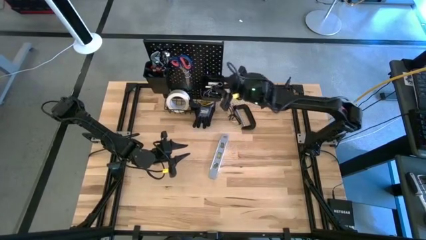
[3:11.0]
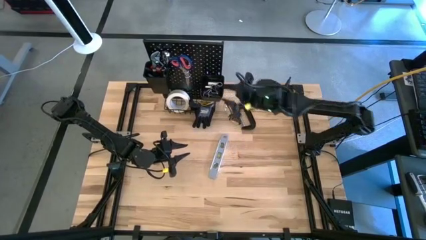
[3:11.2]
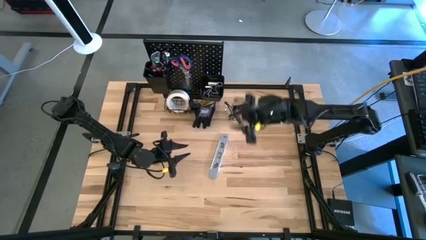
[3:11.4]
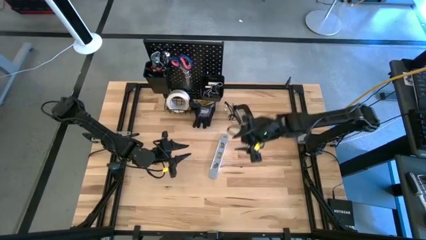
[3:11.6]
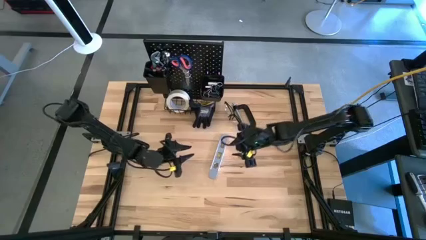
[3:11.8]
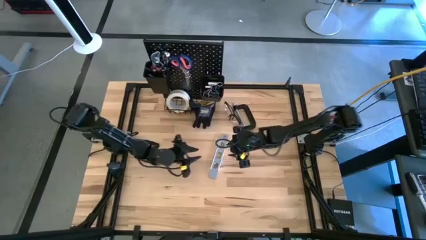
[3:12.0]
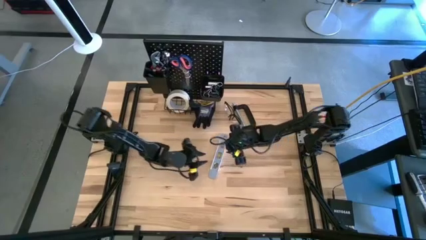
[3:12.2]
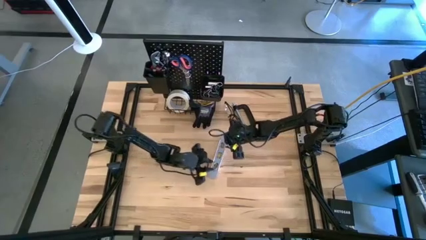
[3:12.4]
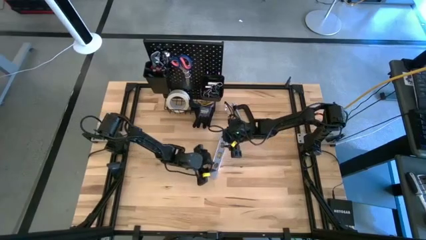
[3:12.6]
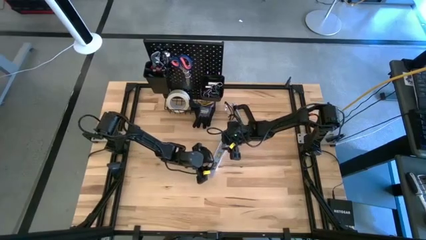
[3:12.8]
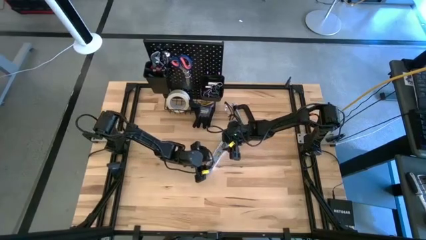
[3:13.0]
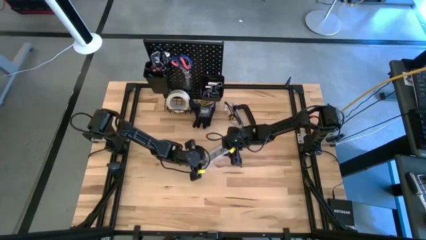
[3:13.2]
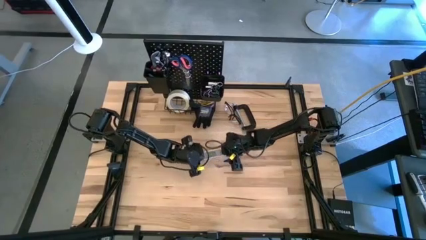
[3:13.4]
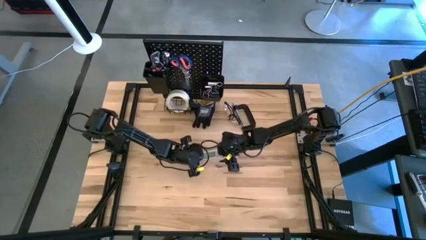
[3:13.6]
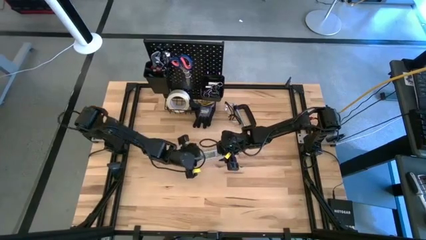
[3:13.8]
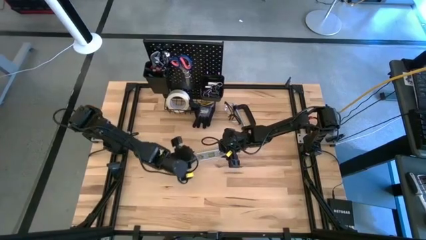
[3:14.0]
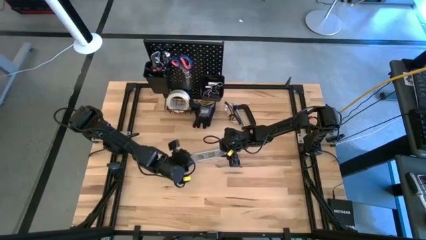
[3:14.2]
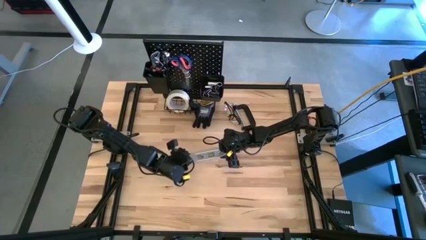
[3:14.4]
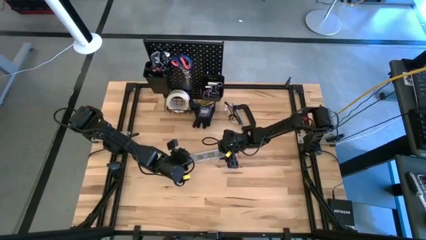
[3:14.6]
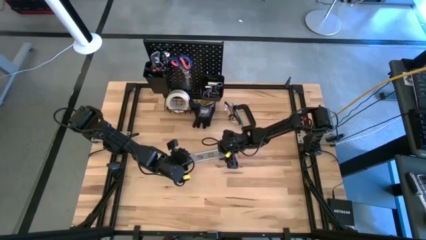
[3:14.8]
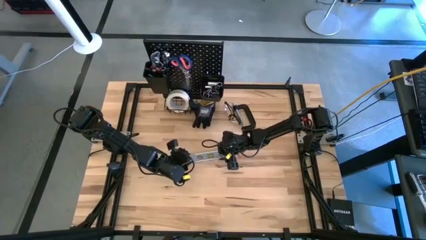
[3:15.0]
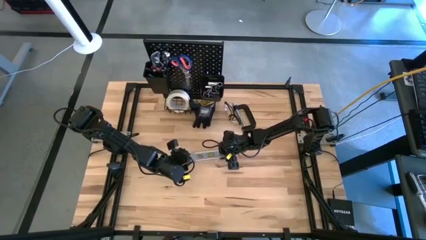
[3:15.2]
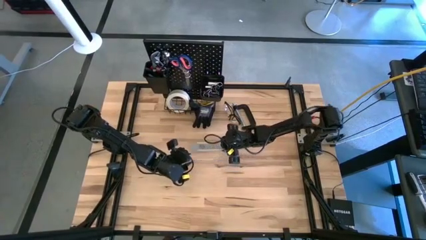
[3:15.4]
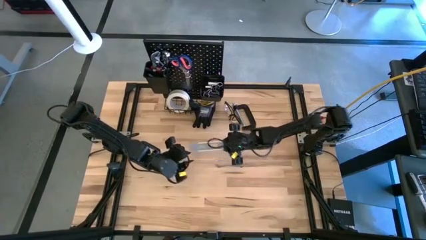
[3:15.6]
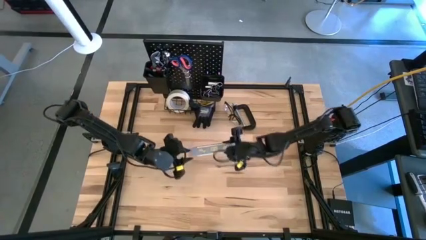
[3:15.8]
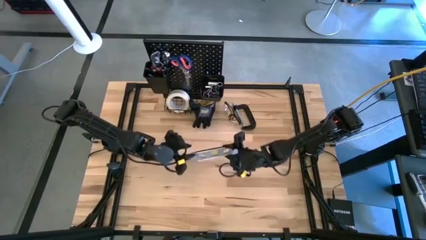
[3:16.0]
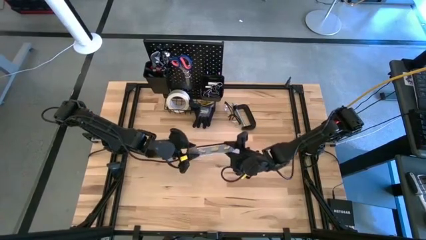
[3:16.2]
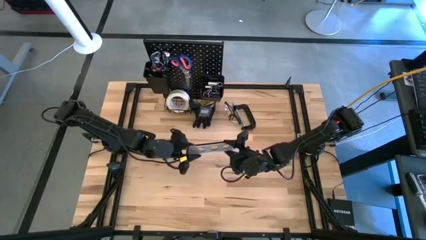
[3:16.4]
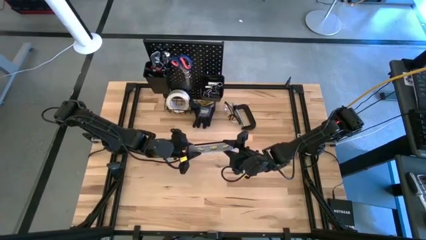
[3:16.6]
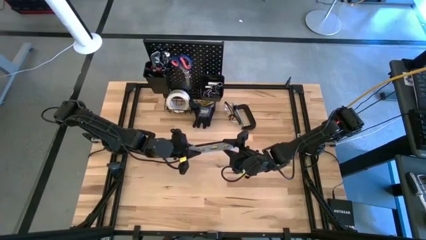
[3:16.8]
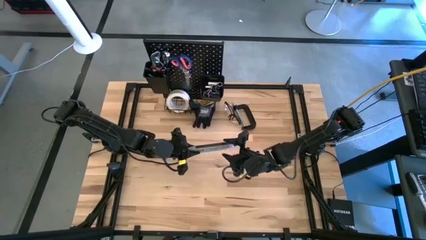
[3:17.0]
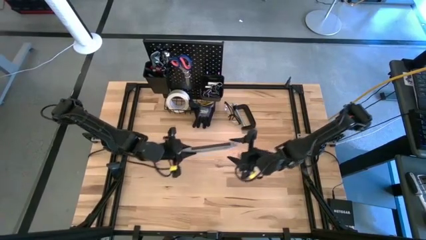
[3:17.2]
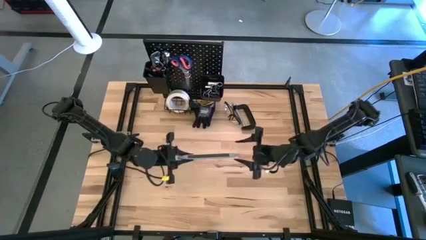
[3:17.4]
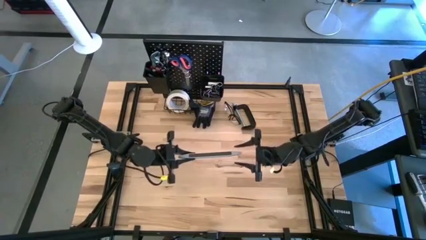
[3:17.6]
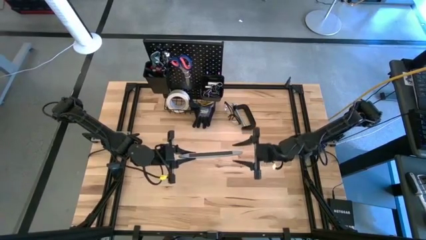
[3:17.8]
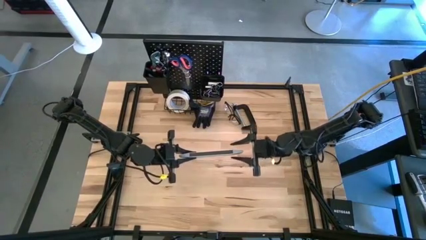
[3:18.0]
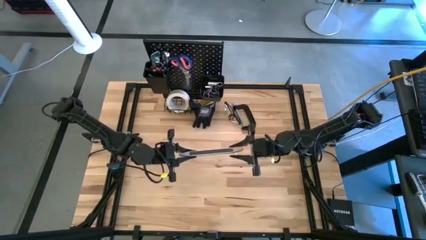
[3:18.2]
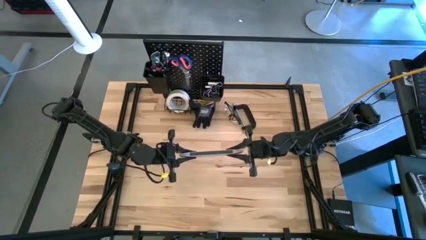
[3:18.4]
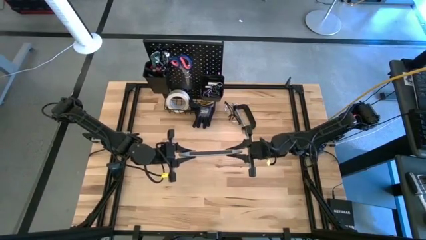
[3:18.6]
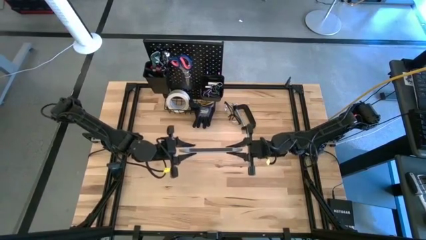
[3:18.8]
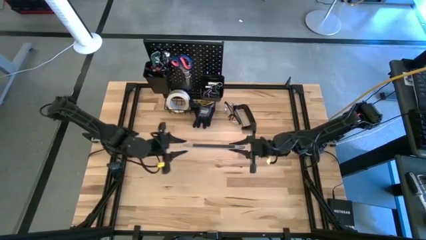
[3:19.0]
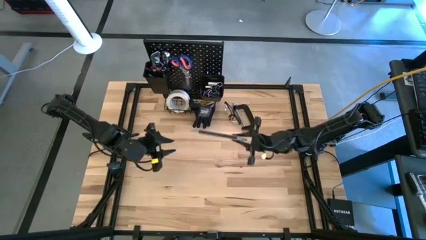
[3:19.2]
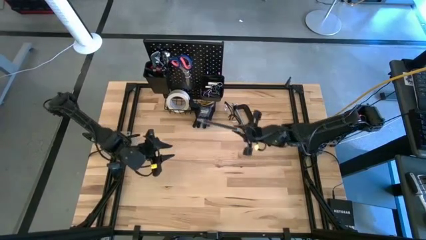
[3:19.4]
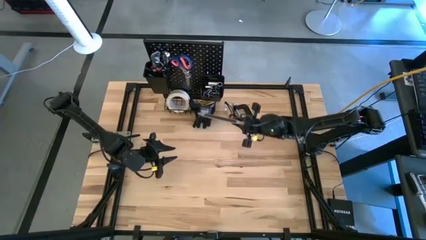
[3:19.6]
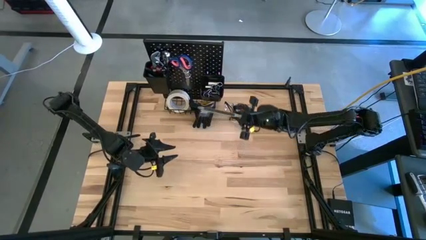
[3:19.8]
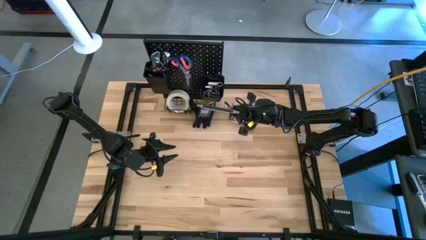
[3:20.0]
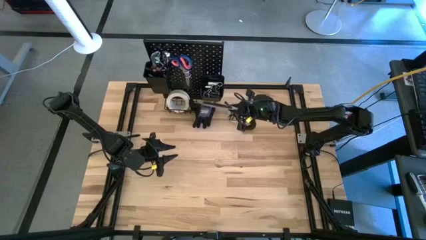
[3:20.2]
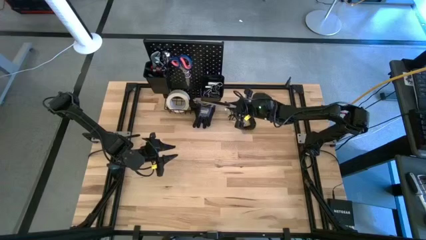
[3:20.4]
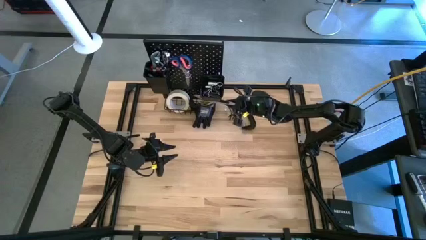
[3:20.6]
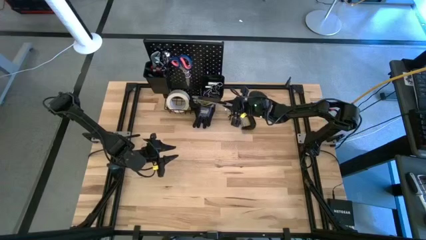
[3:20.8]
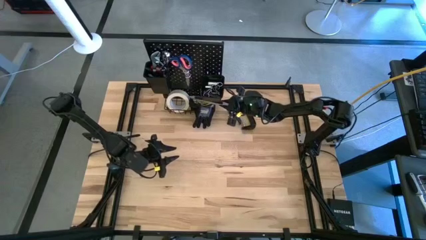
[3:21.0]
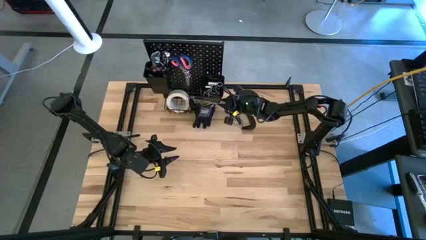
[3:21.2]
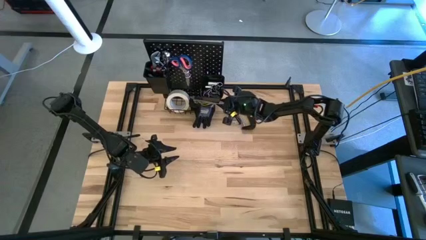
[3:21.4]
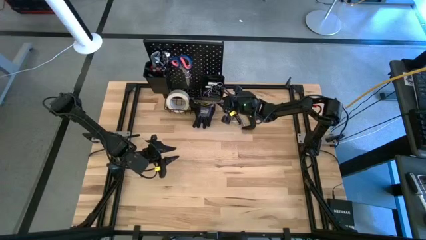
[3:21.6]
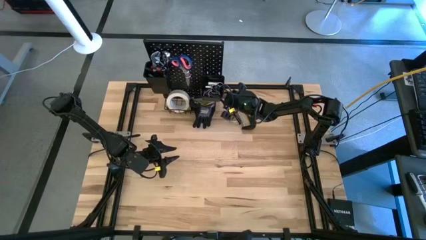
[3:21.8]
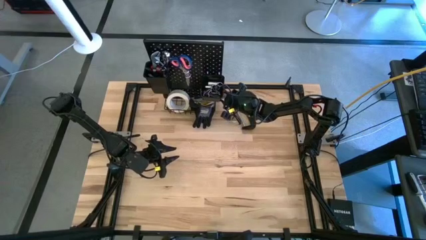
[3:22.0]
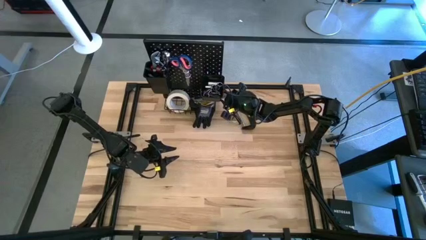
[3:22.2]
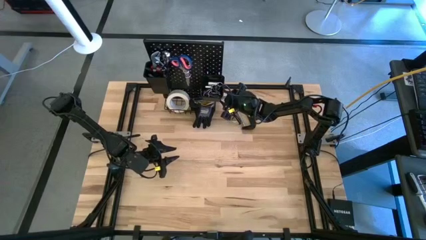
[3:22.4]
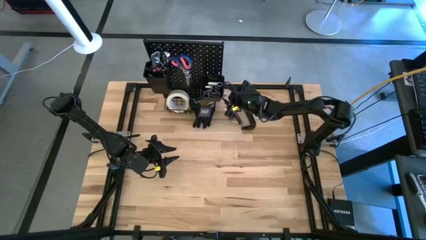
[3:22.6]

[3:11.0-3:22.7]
Task: Hang tools onto peg board
Put the spirit level into the wire basket on the pegboard

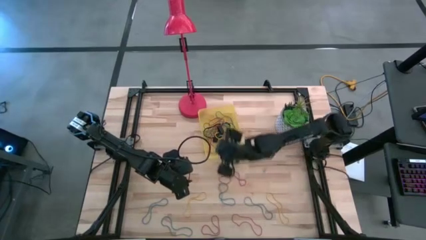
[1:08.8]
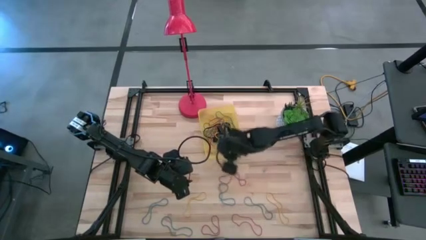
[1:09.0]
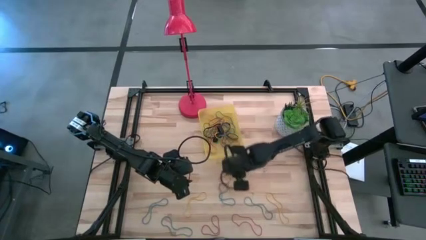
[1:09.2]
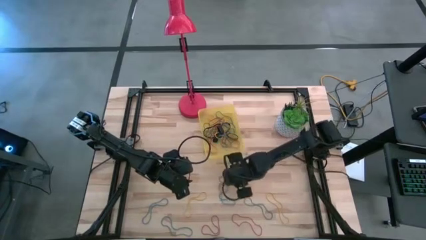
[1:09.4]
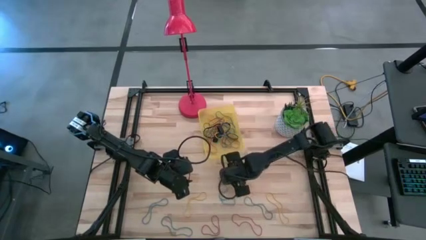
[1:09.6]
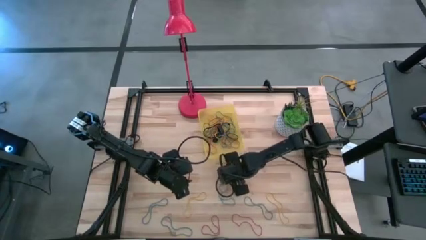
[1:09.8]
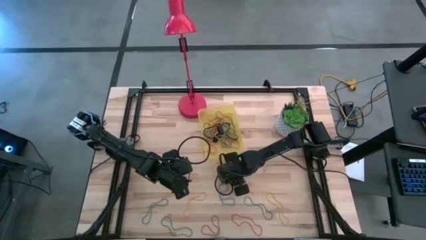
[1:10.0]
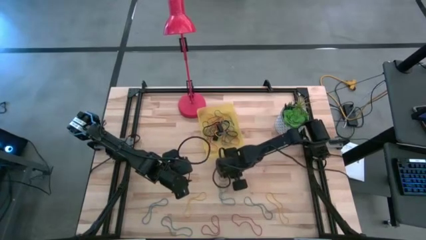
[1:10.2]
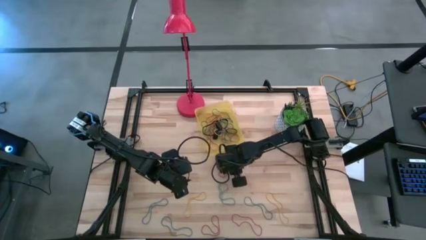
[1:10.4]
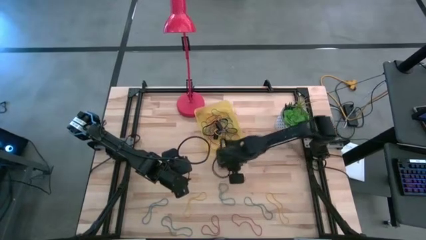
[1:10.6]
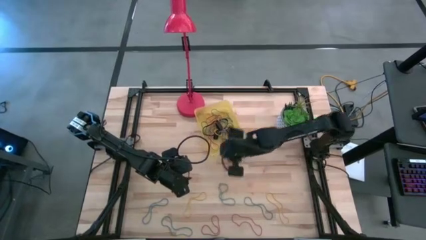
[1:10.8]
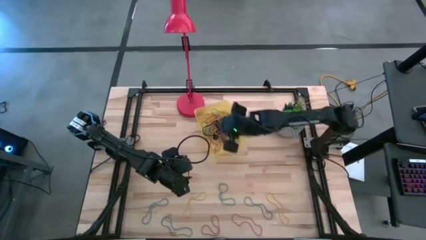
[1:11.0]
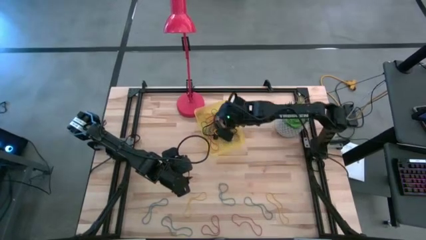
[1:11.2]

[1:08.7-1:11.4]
Task: Pick and place rubber bands into bin
Put the red rubber band into the yellow bin

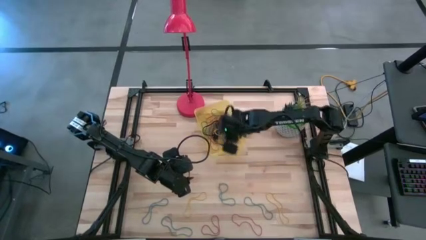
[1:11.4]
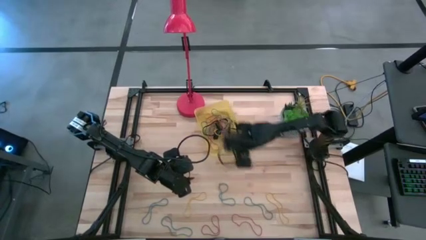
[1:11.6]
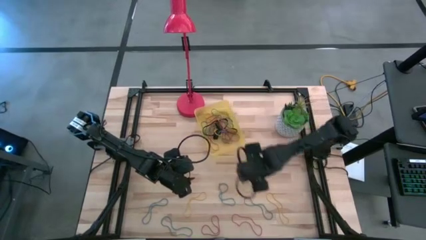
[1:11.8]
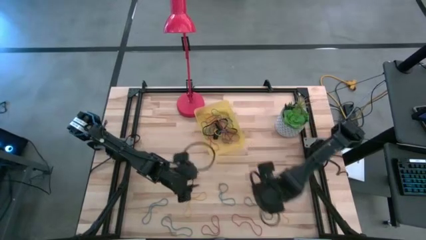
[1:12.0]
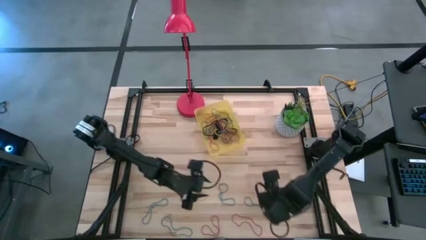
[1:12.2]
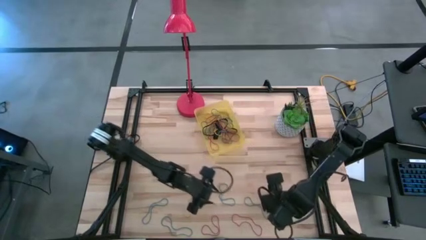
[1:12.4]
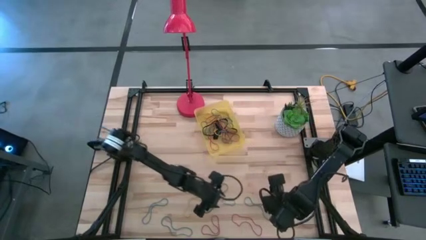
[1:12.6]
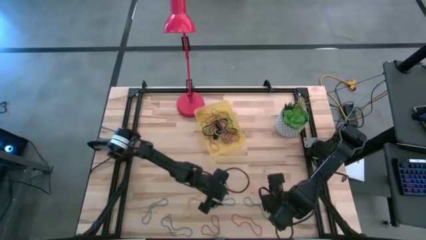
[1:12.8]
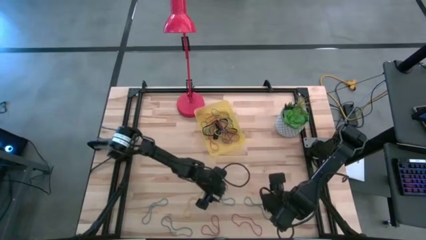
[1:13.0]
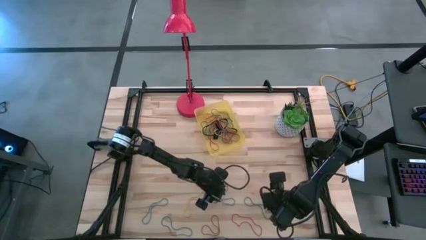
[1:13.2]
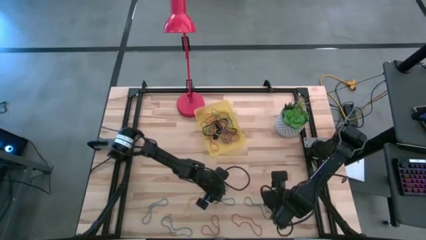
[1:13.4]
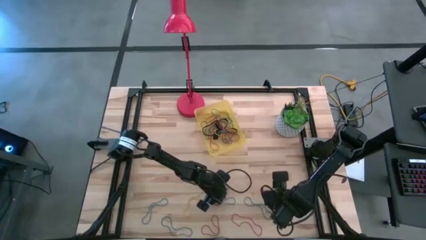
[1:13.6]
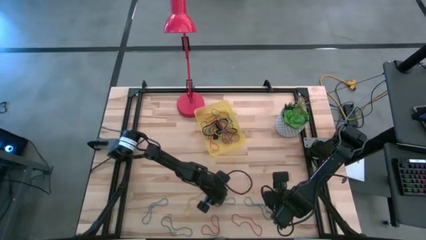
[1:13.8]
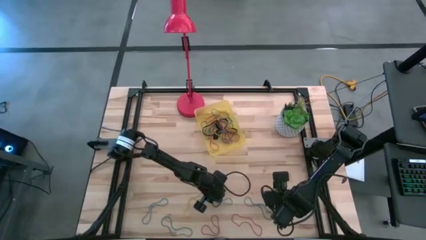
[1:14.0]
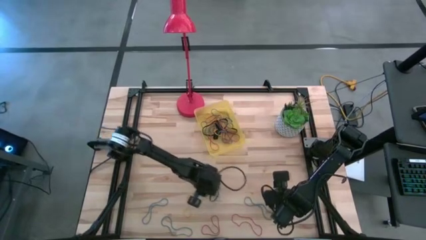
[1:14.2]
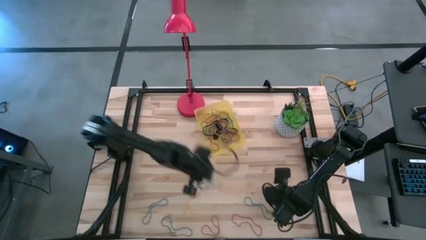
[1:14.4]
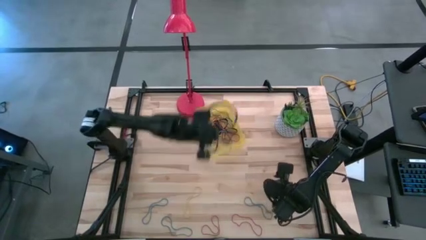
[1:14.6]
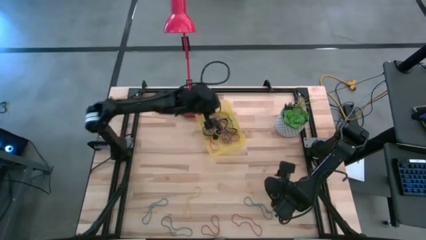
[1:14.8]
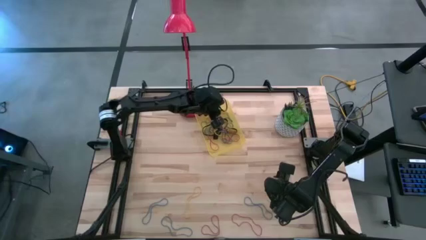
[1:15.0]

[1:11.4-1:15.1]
Put the blue rubber band into the yellow bin
